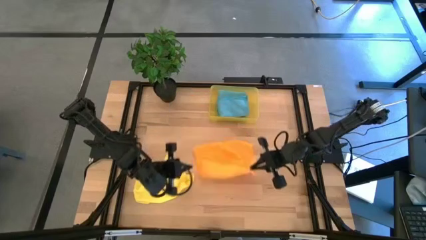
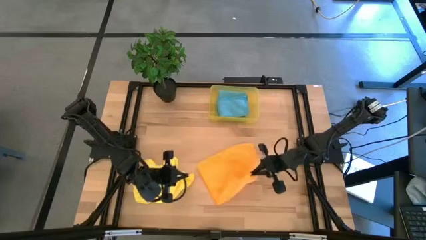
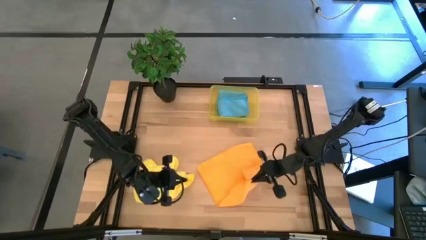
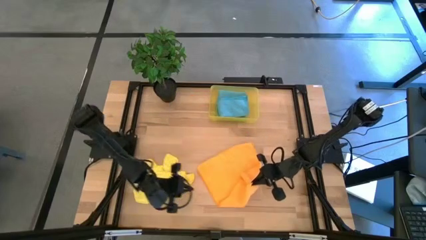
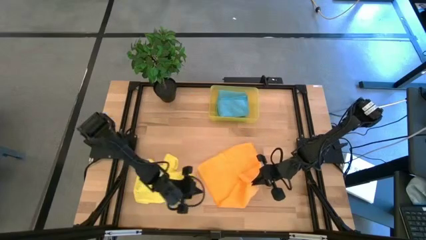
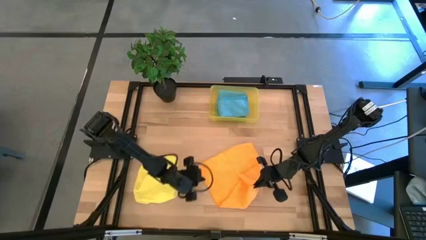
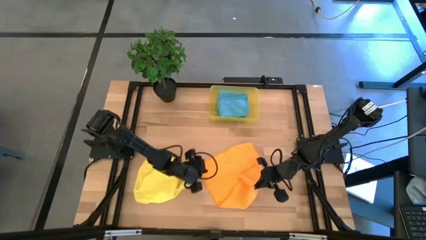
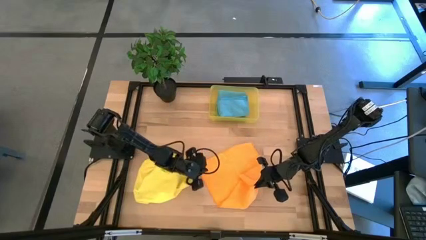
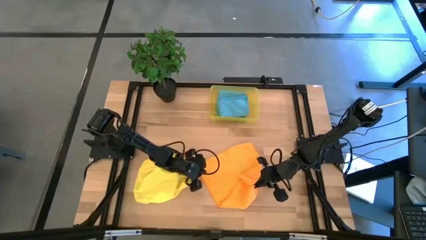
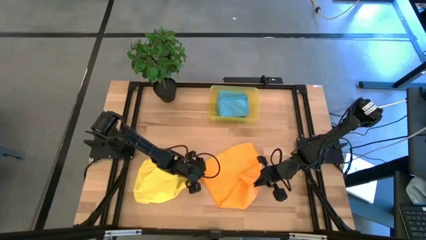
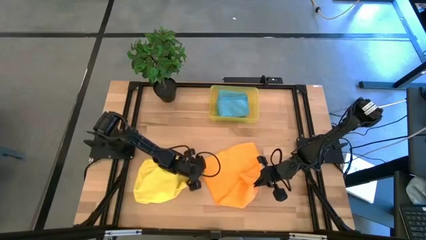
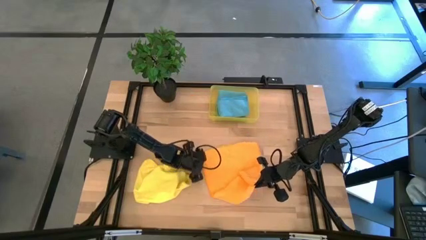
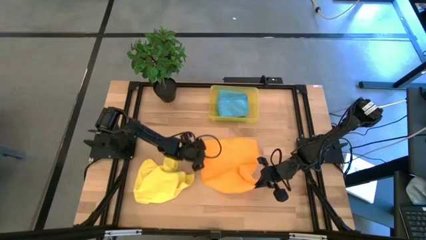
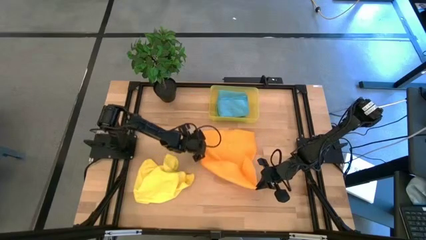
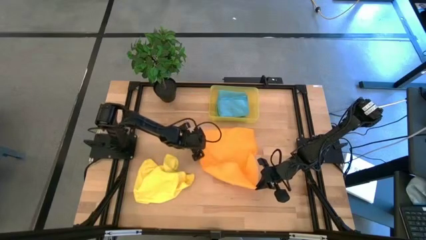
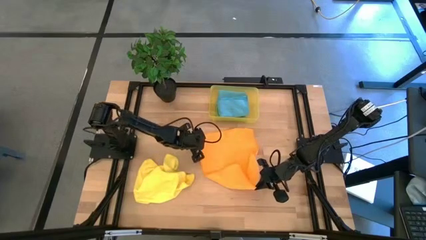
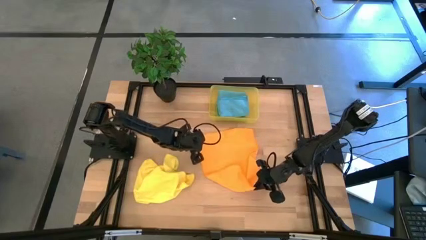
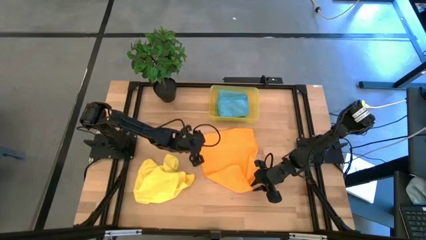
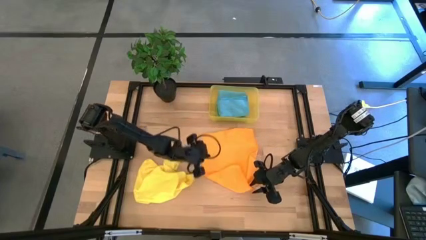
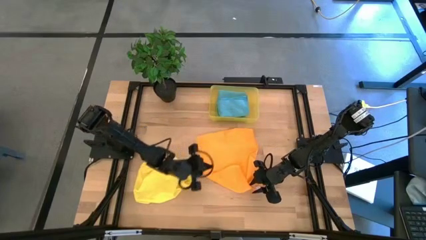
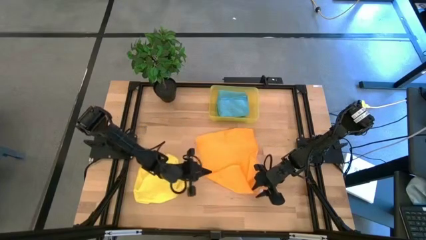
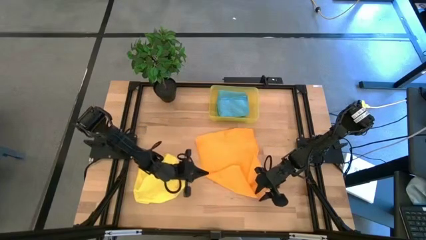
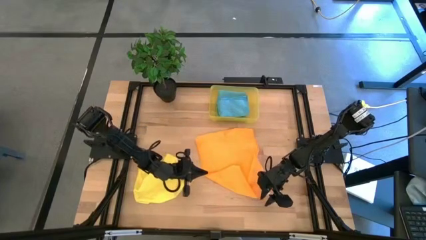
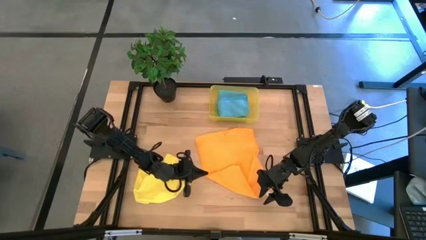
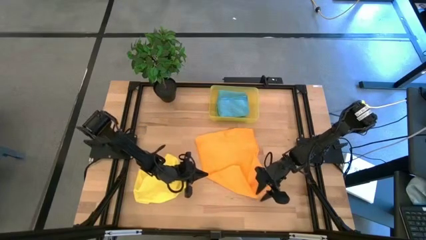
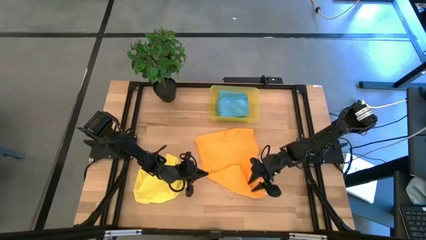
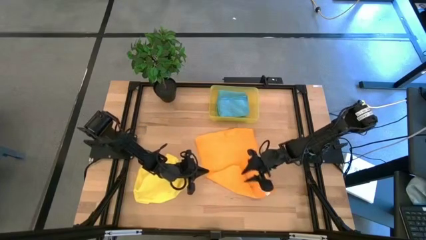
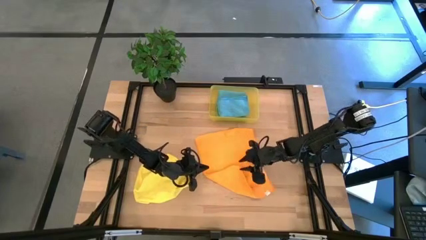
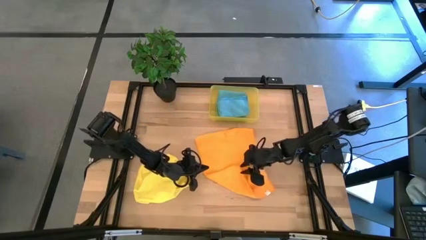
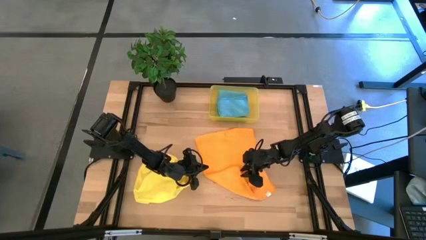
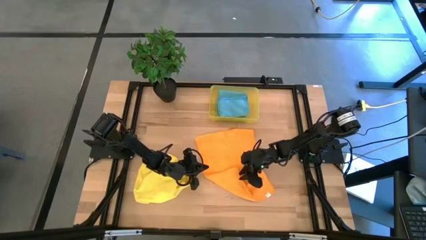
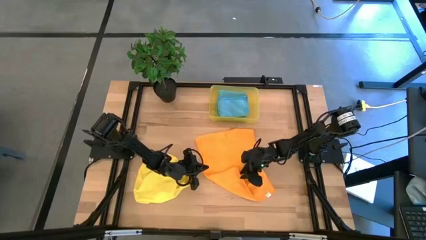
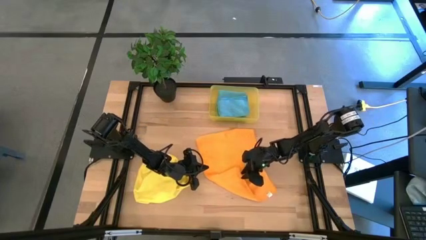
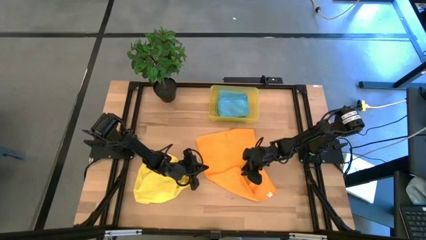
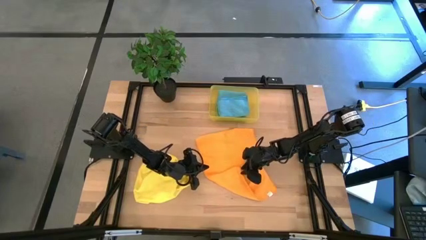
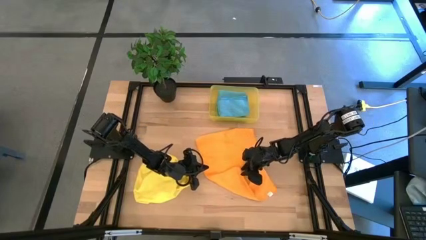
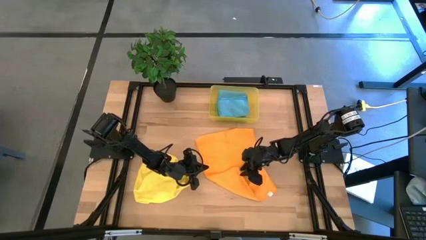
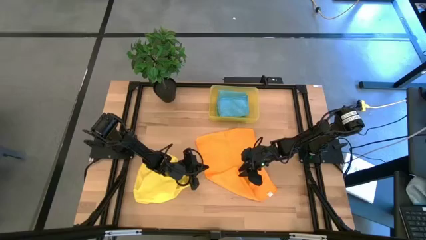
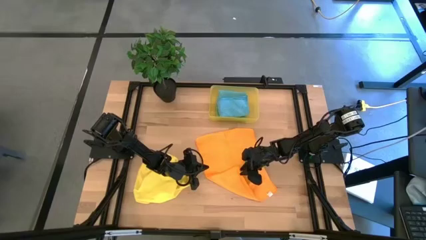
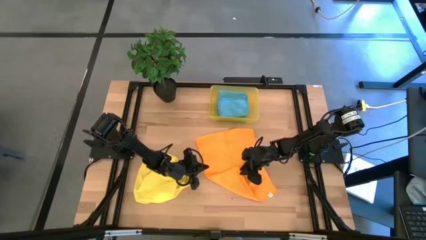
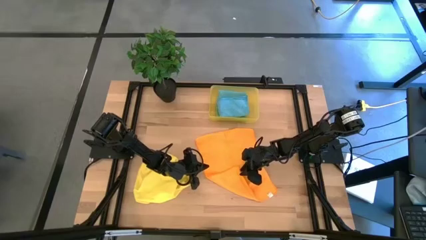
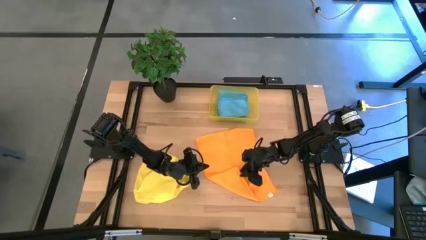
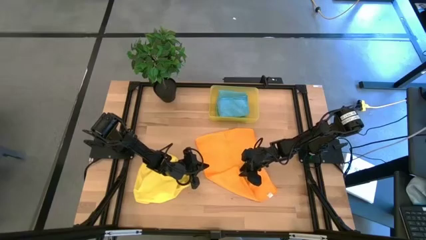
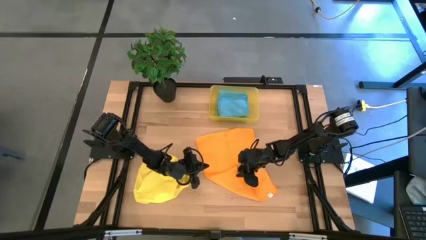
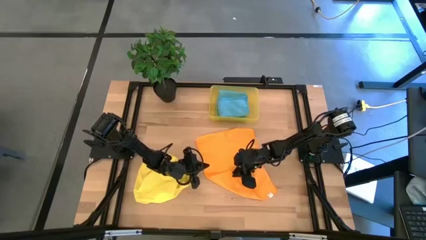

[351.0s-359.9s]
Task: Fold microfiber towels
Fold the orange microfiber towel

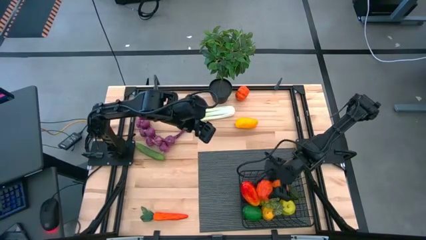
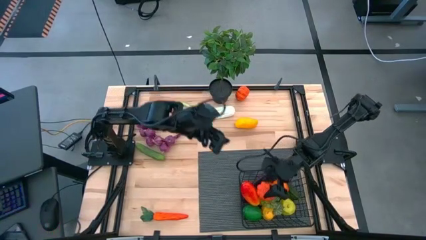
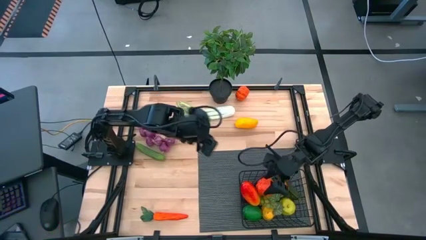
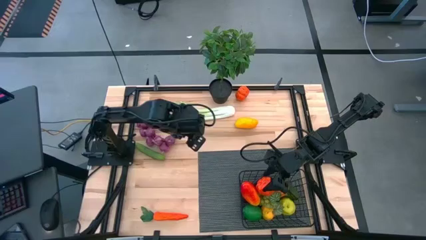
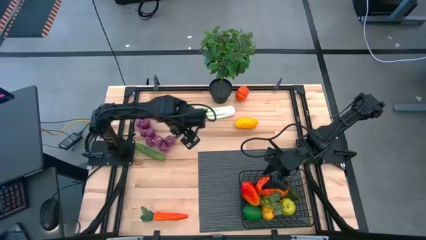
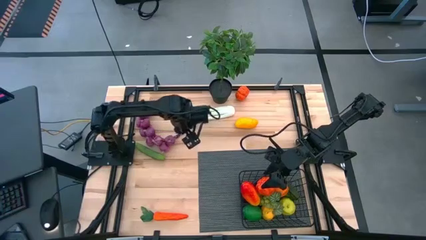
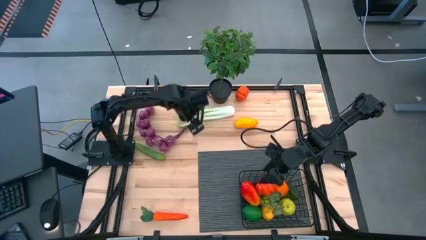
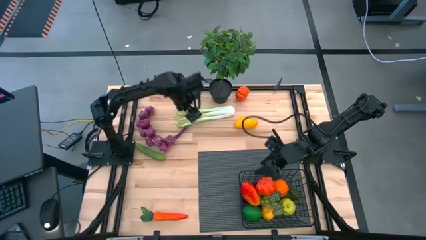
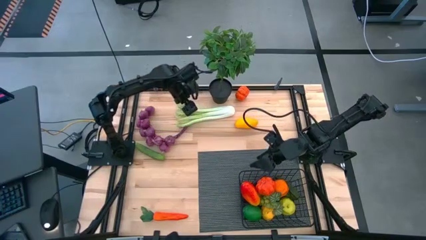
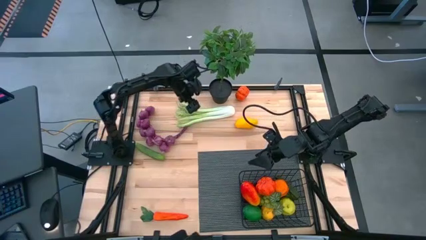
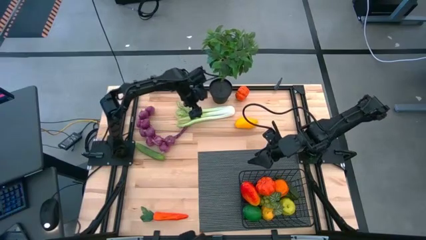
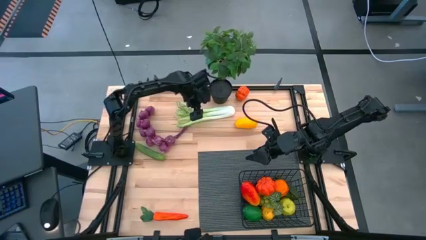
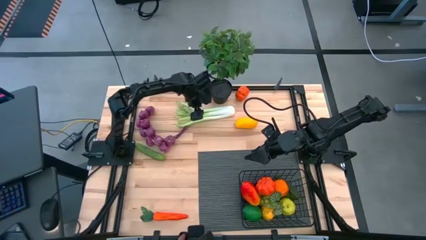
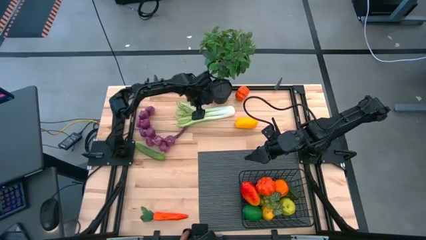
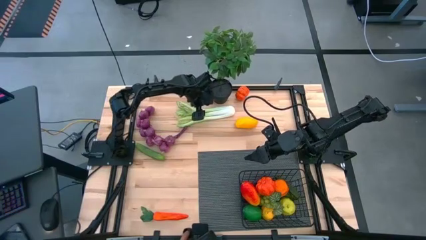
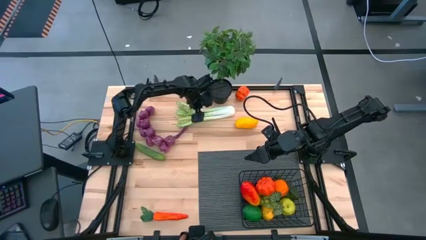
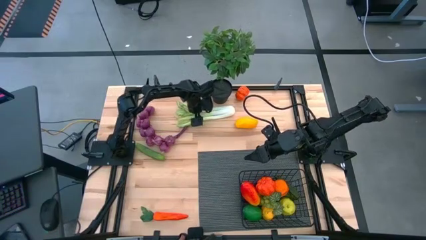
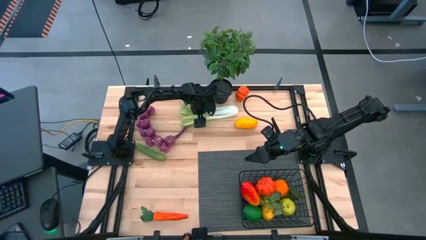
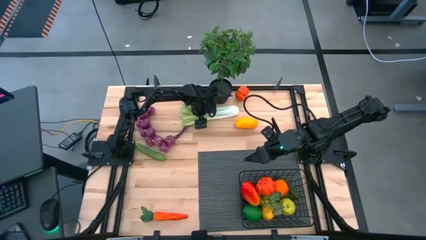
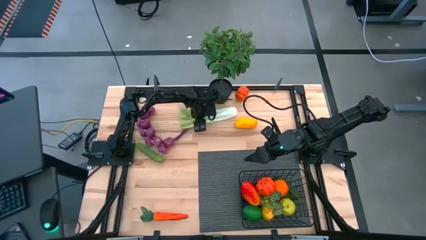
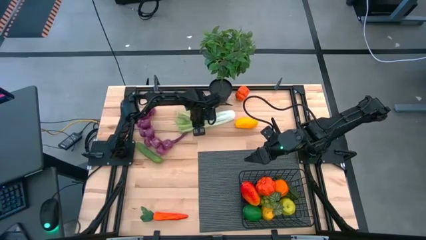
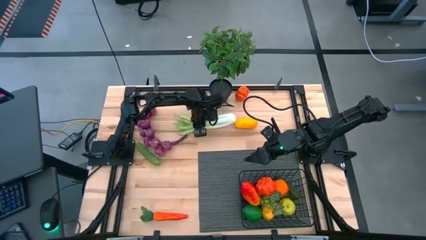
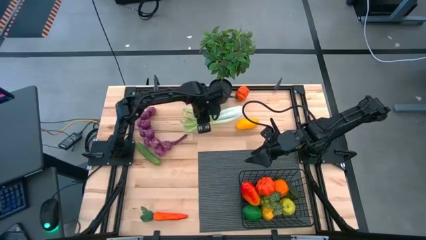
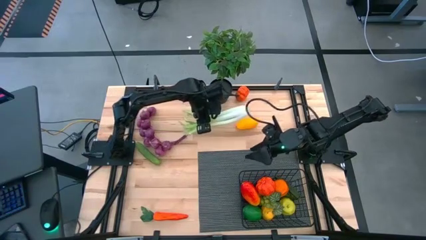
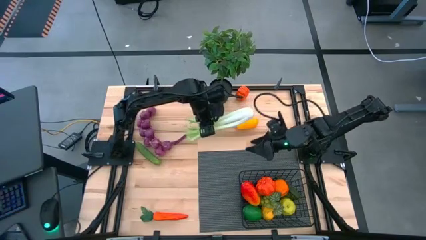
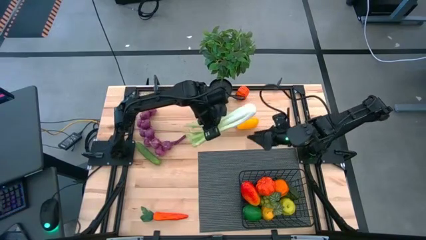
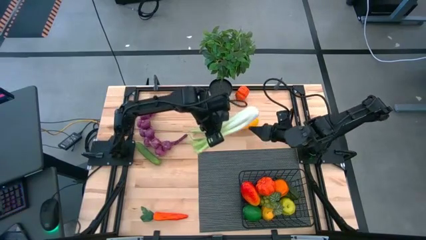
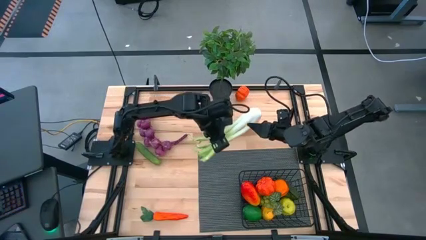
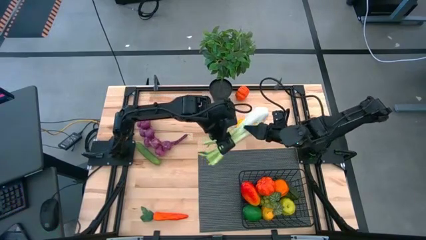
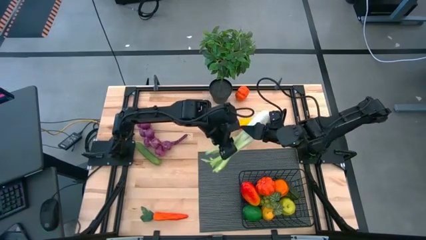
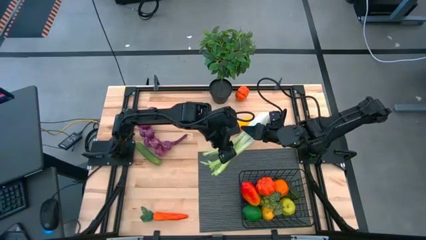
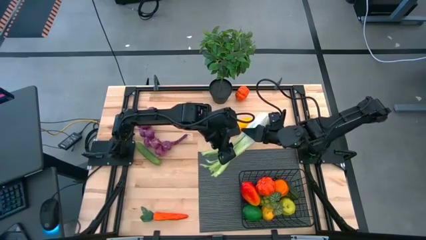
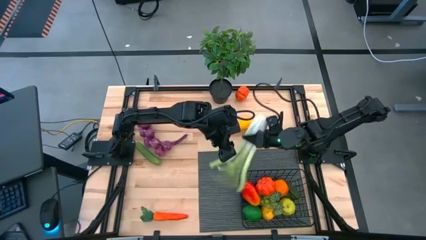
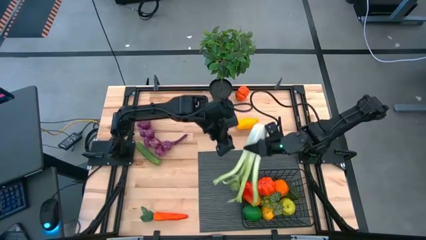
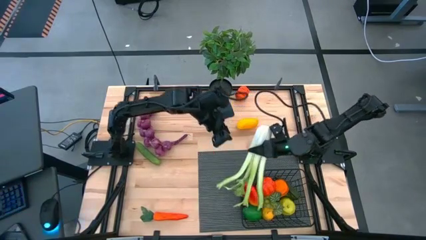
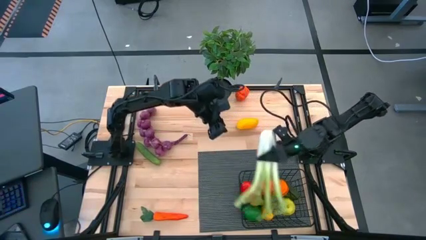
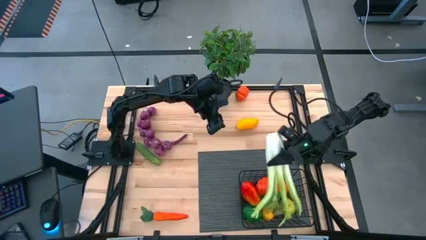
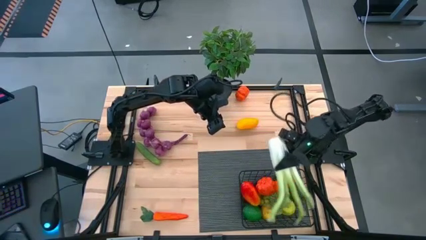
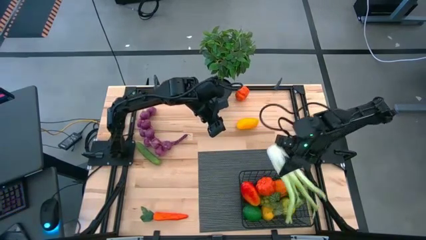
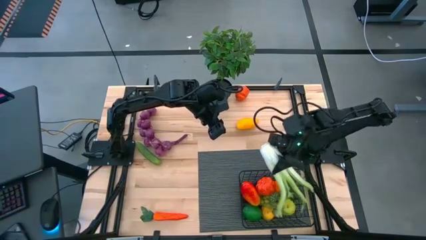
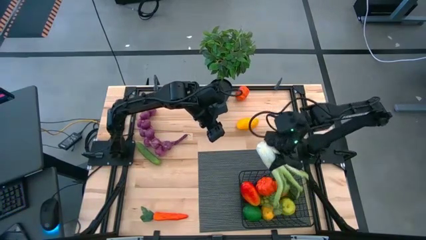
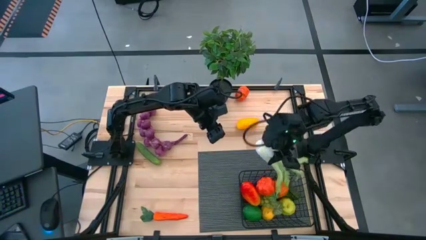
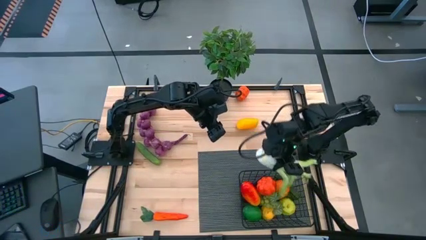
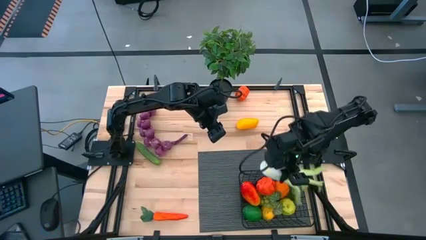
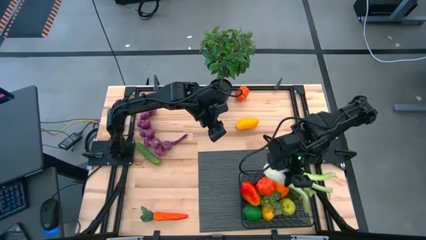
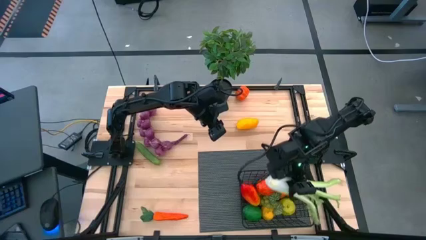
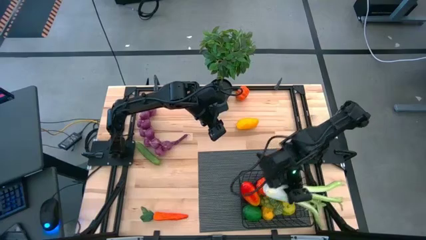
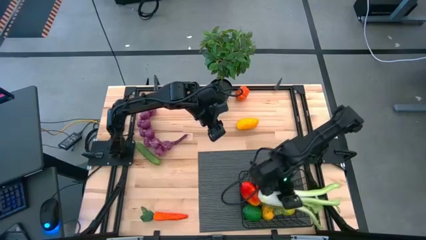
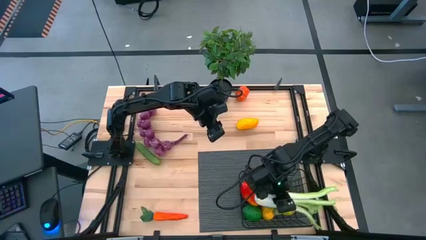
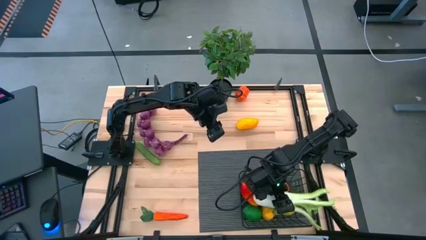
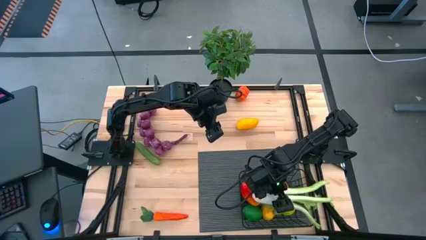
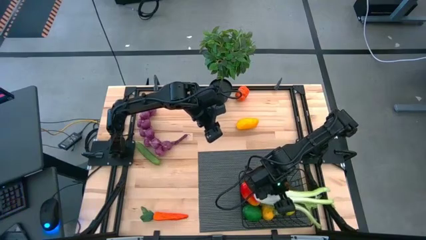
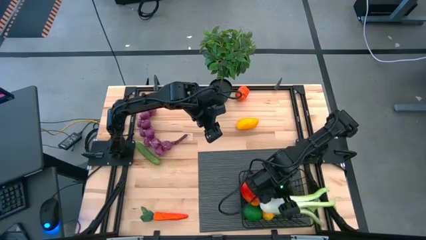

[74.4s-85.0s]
Task: Build produce basket
Put the green celery into the black wire basket
